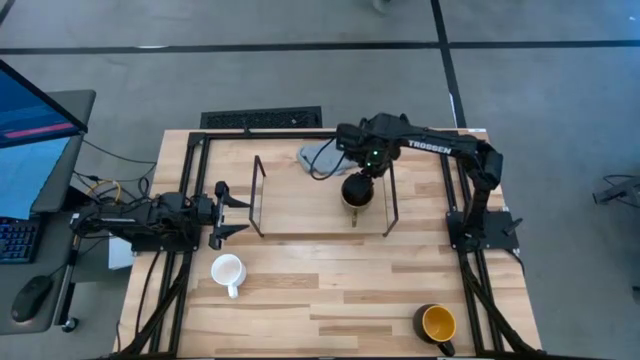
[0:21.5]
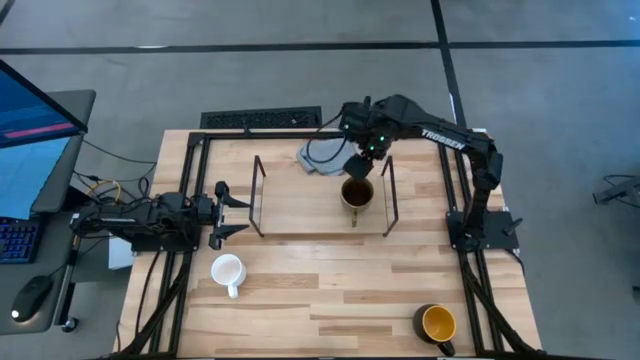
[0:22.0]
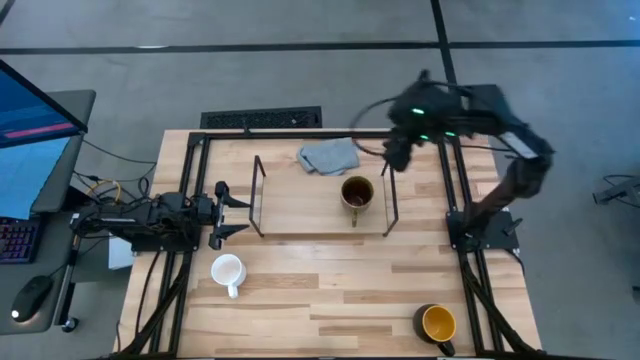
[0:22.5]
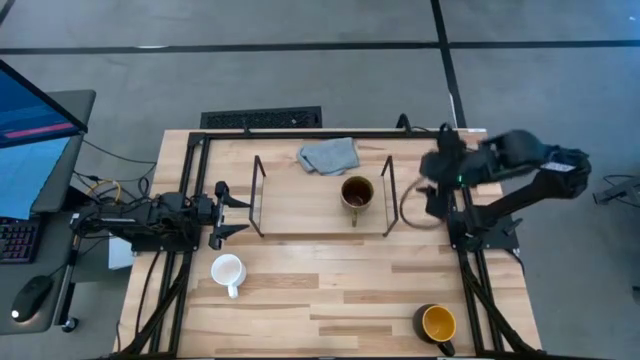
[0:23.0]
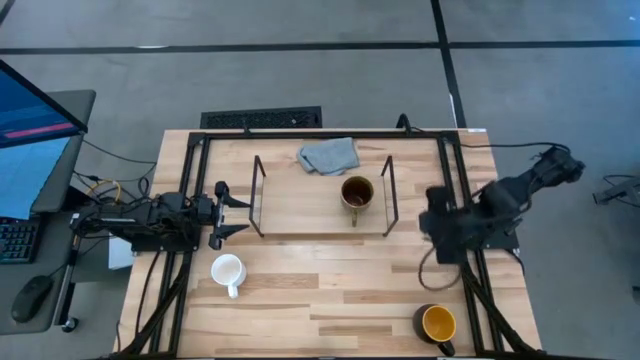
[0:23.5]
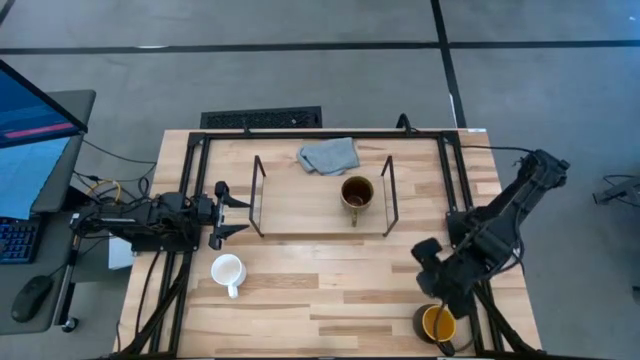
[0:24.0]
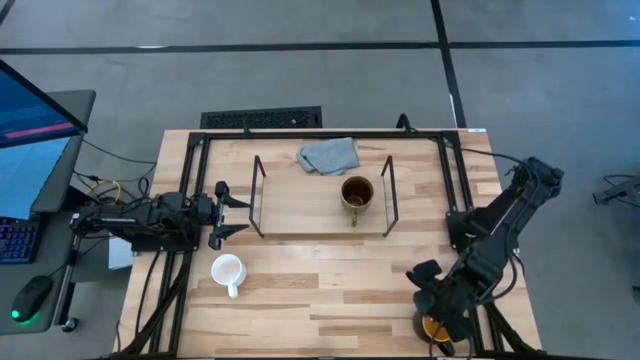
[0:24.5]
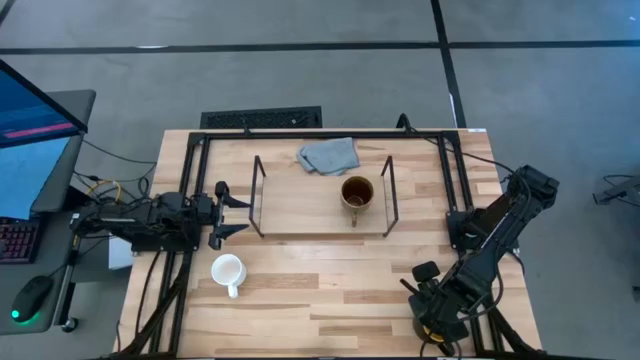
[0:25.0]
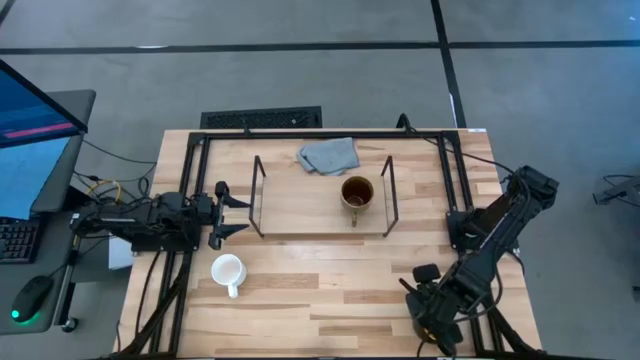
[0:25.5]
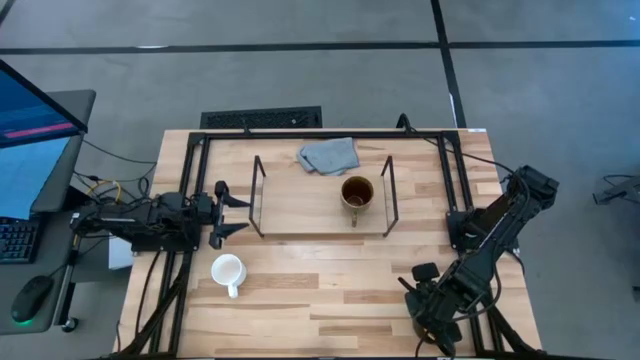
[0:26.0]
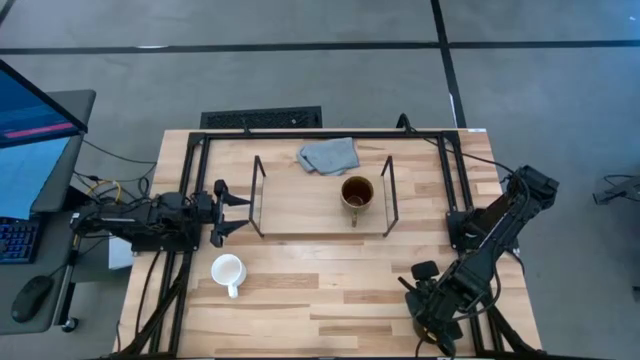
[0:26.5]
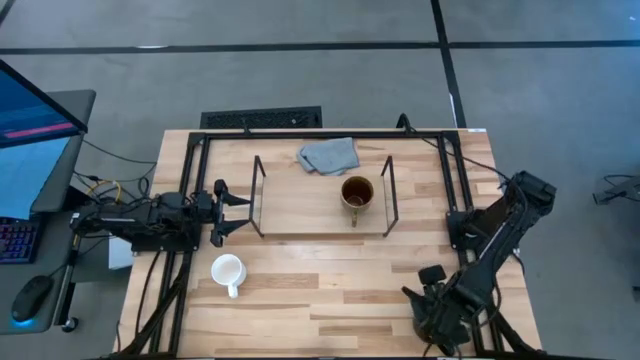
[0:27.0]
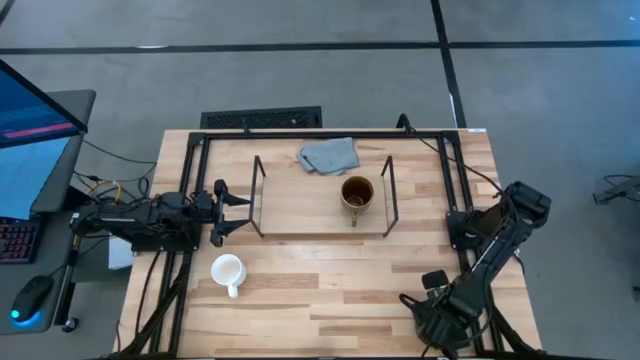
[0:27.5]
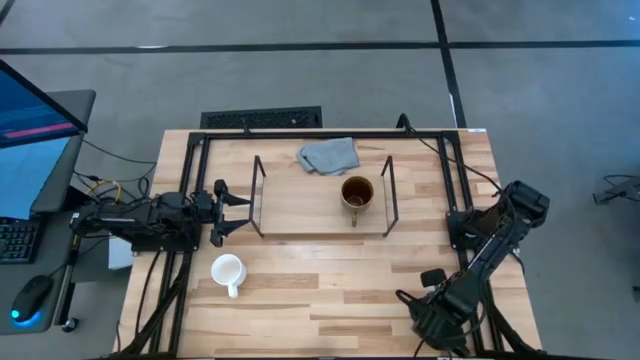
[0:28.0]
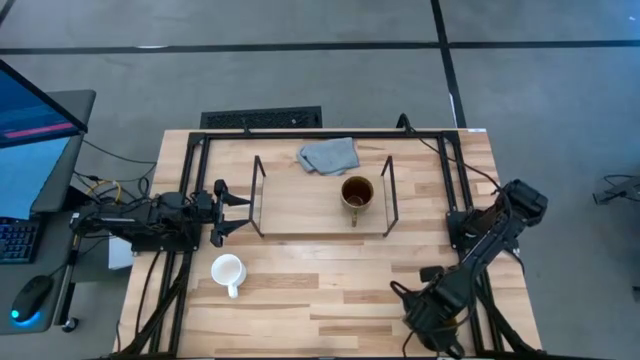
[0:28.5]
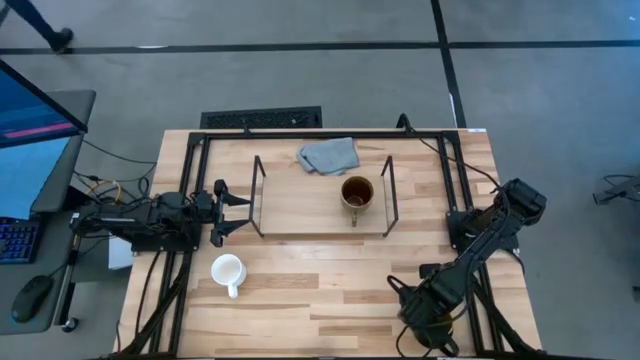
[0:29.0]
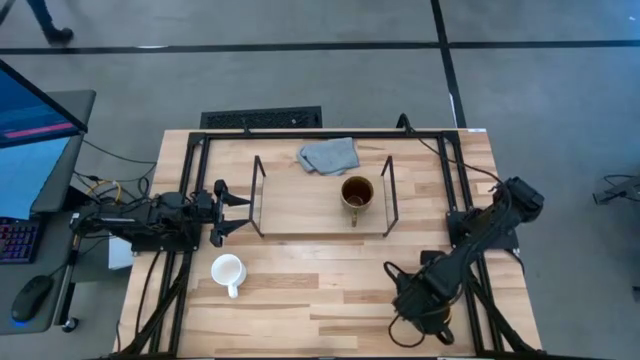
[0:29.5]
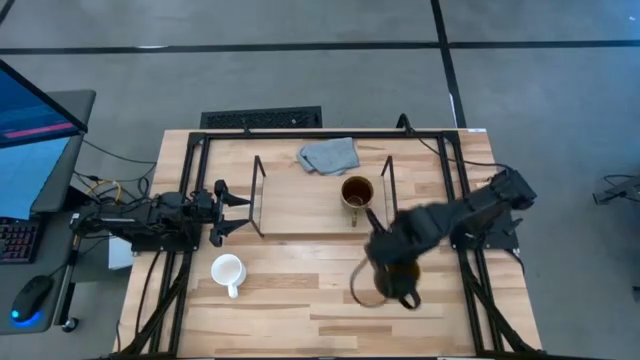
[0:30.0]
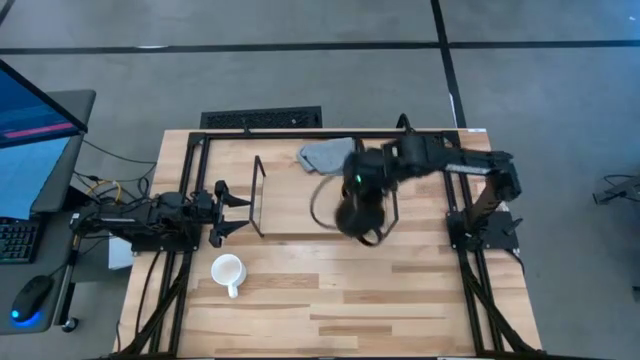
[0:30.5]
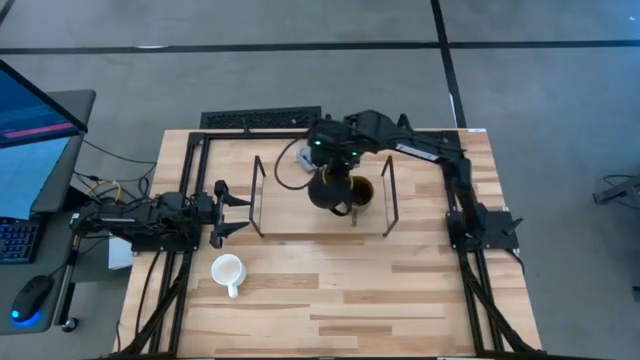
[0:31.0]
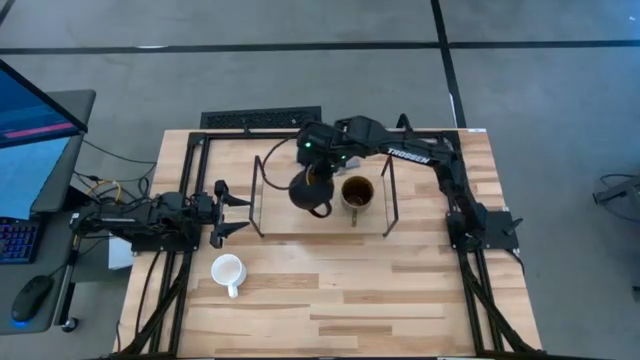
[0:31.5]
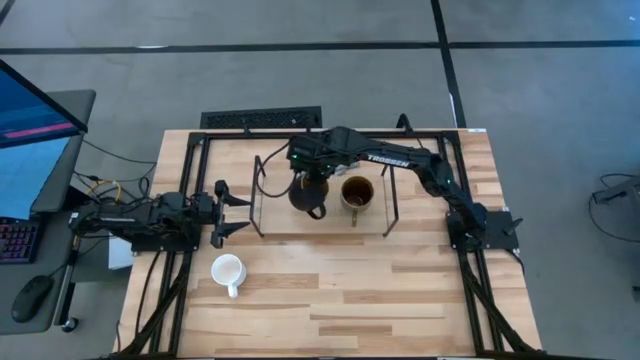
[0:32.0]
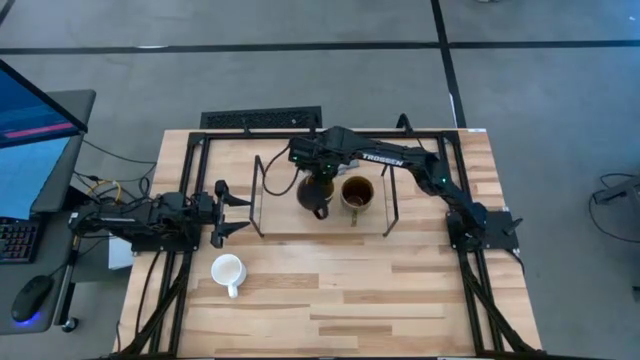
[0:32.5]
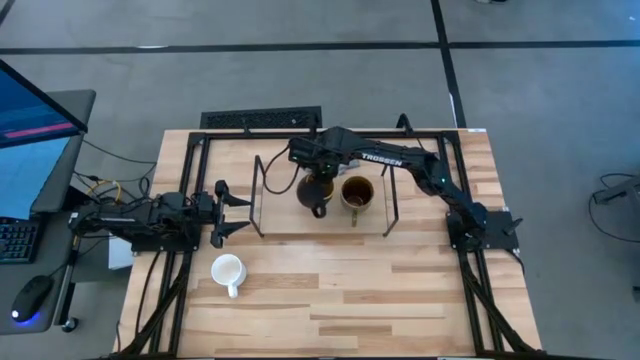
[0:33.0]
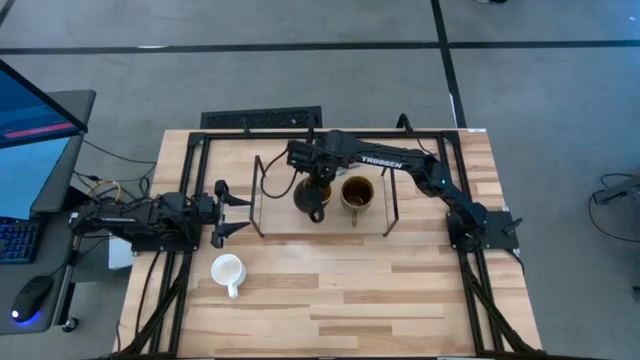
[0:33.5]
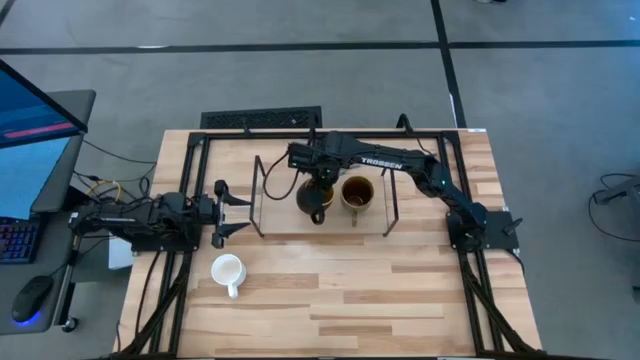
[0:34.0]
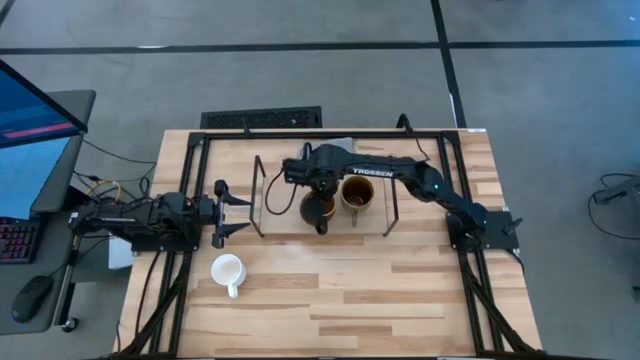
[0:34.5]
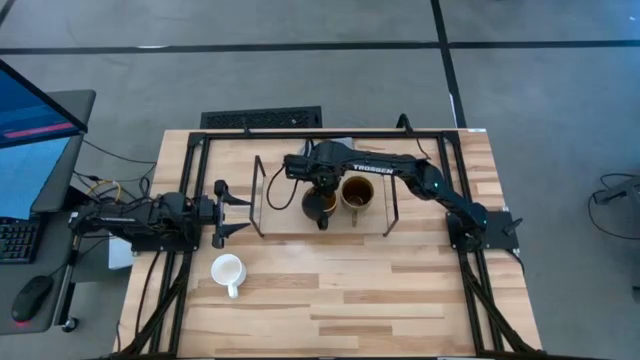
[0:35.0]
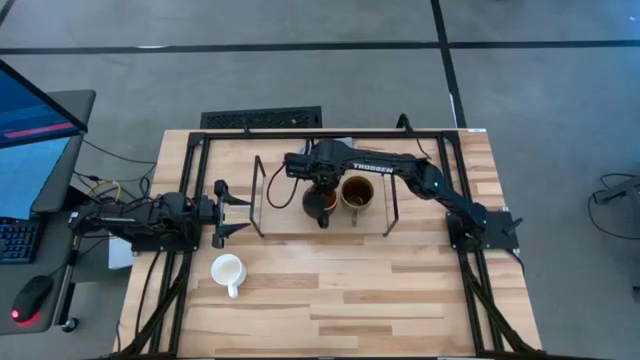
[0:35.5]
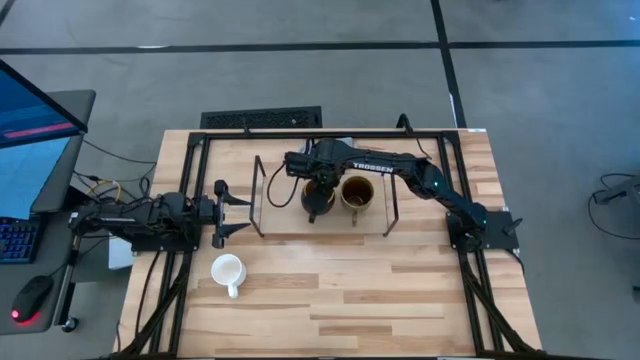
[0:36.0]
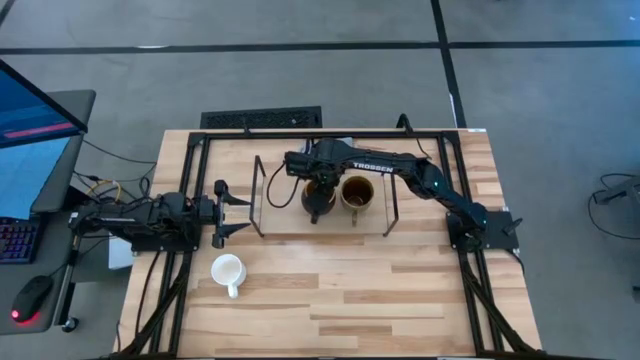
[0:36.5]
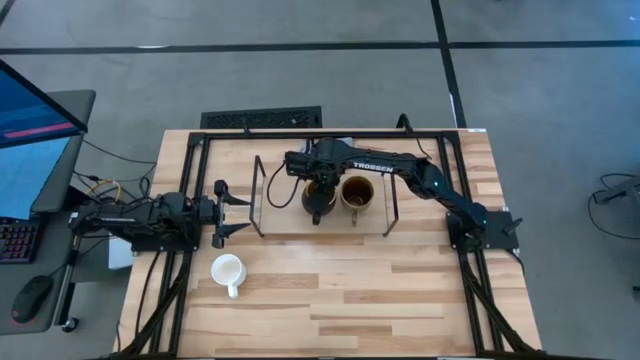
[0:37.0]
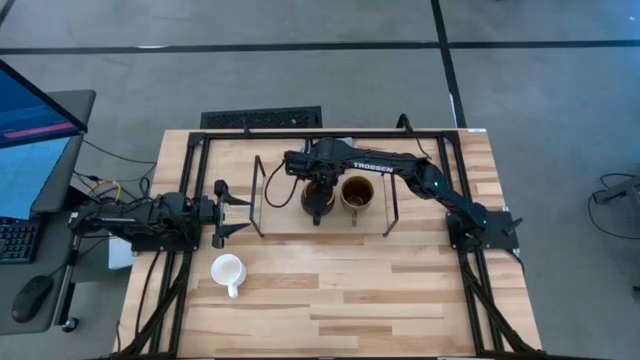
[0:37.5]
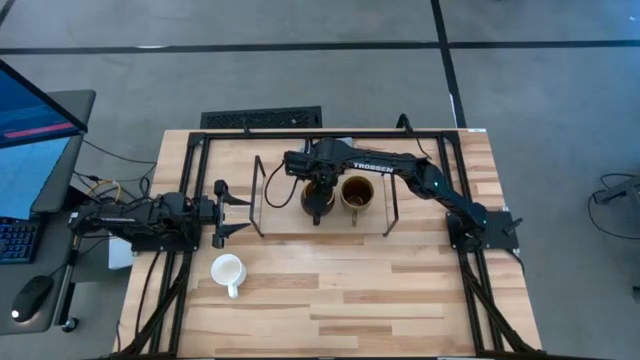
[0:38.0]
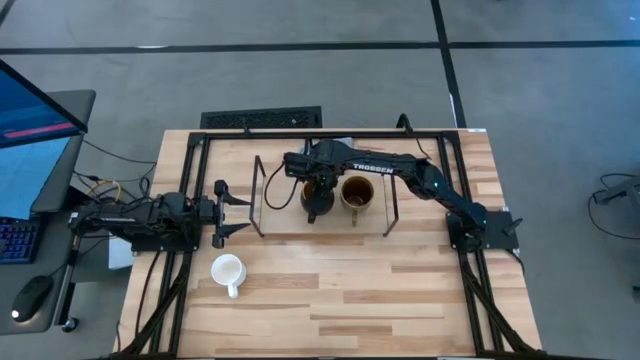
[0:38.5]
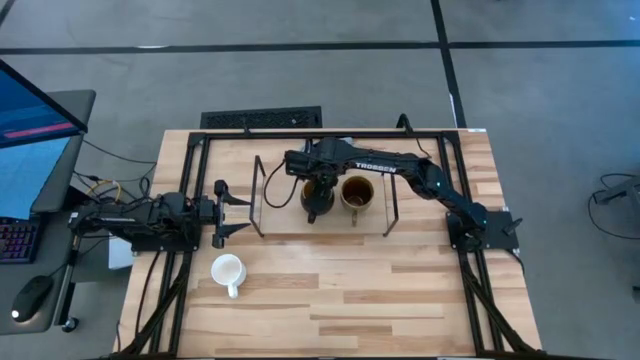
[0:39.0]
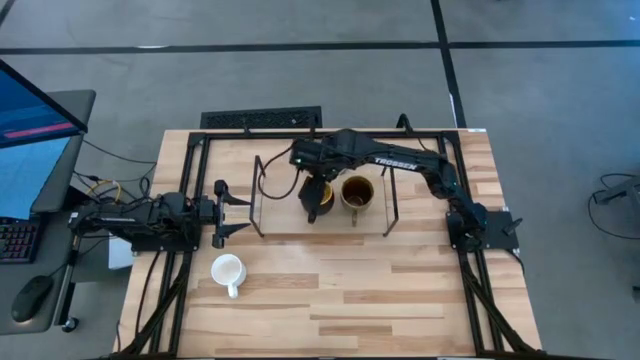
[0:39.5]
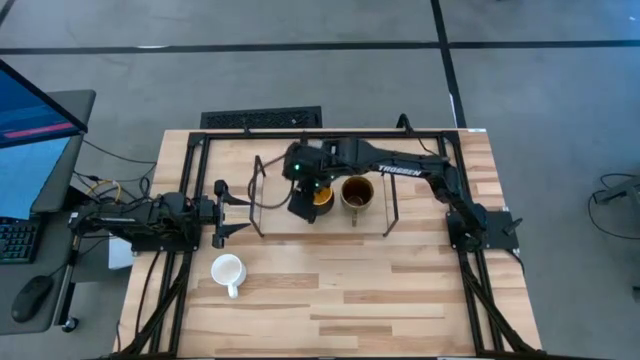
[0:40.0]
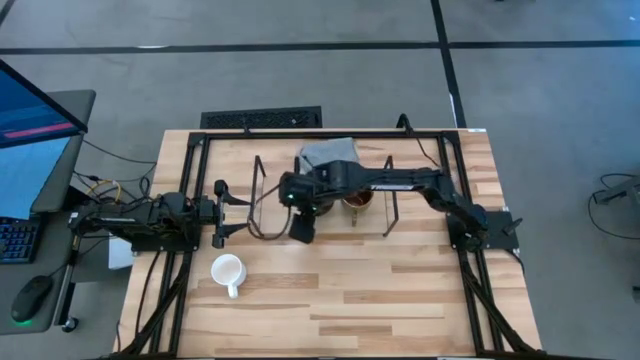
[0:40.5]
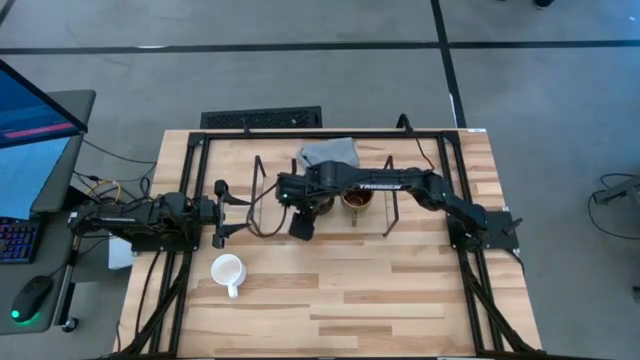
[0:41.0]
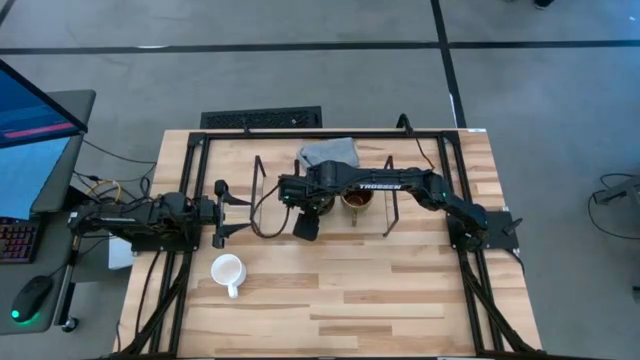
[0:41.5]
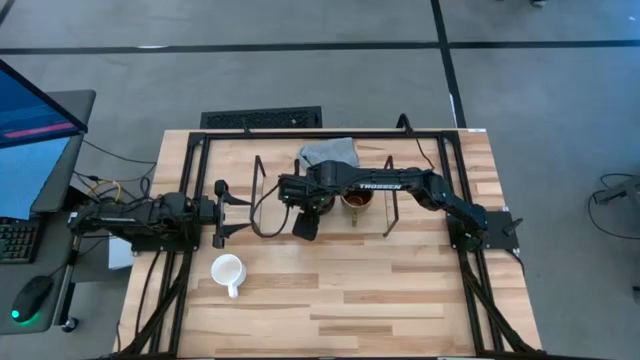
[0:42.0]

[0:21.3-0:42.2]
Task: Stack small to large cups/mugs on shelf
Put the black mug on the shelf
